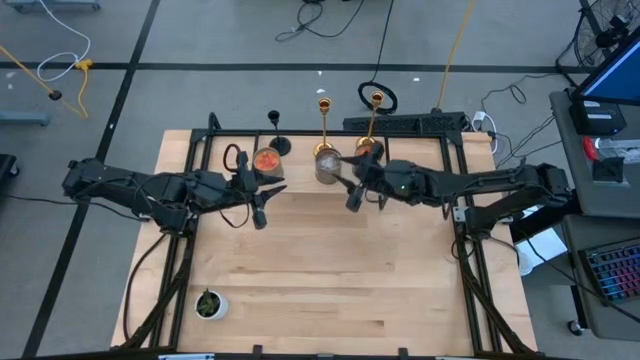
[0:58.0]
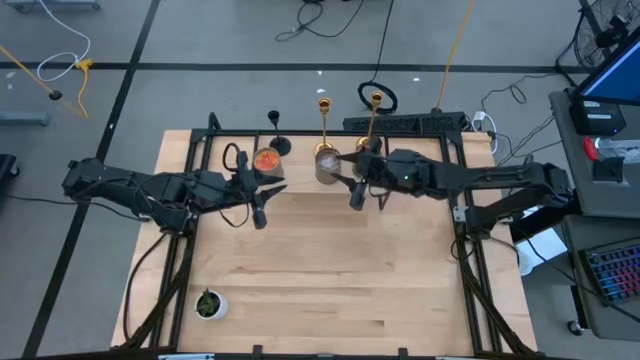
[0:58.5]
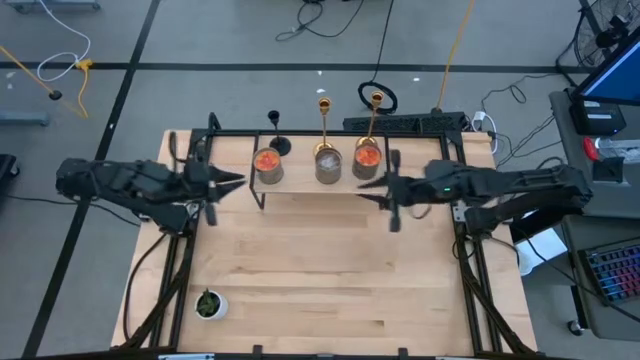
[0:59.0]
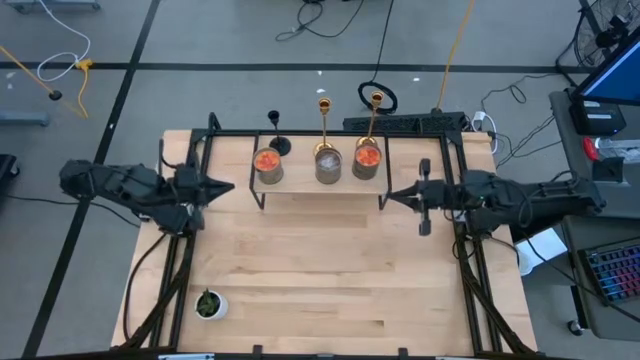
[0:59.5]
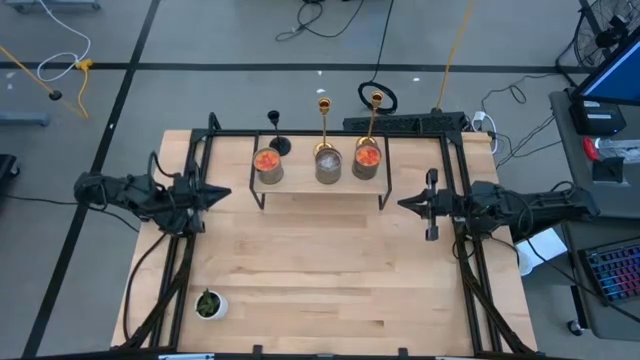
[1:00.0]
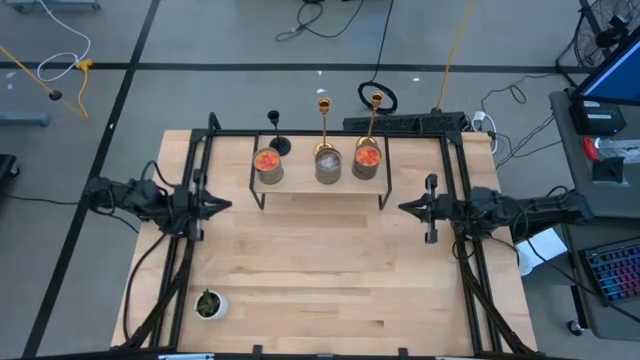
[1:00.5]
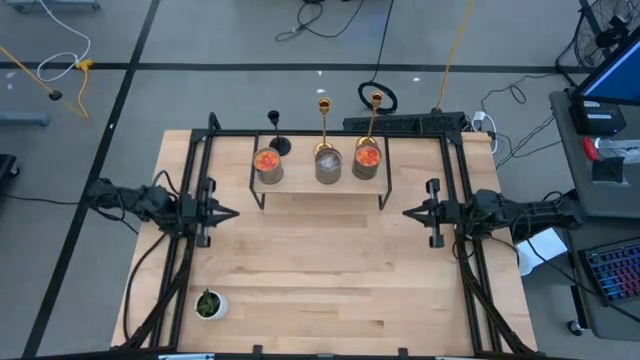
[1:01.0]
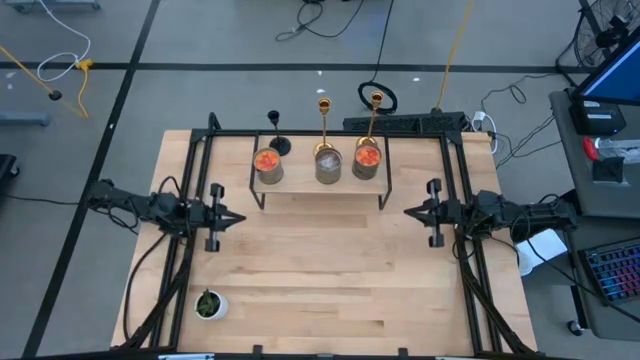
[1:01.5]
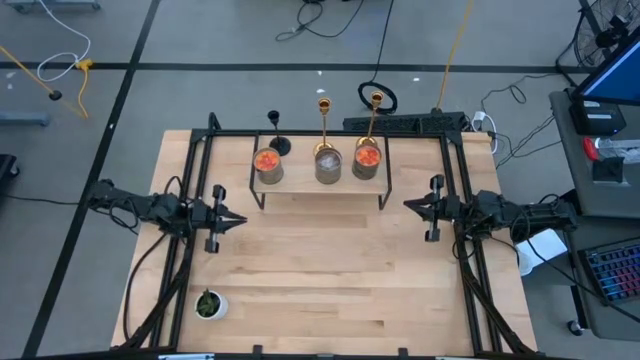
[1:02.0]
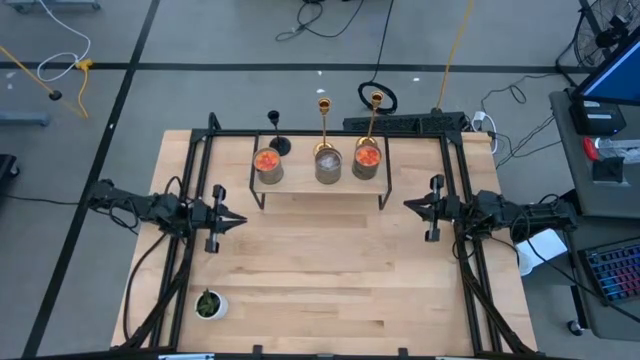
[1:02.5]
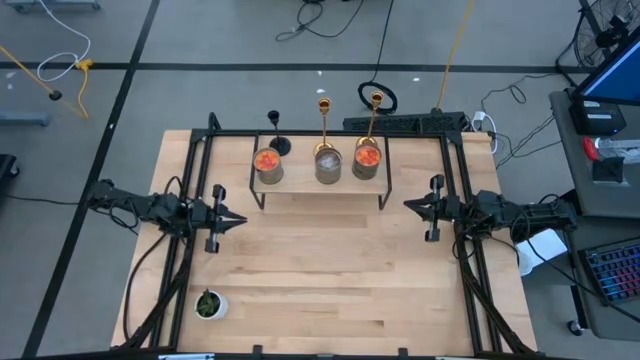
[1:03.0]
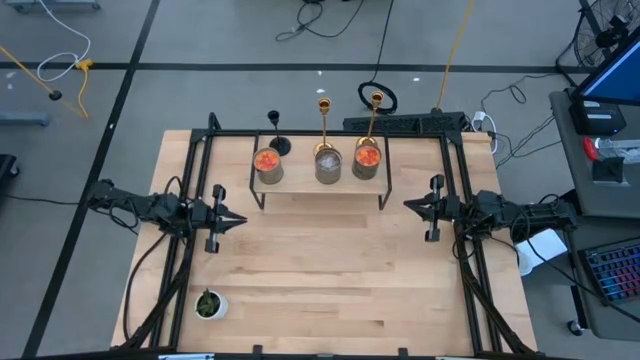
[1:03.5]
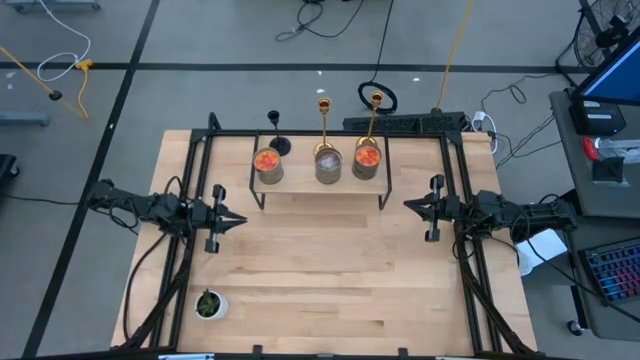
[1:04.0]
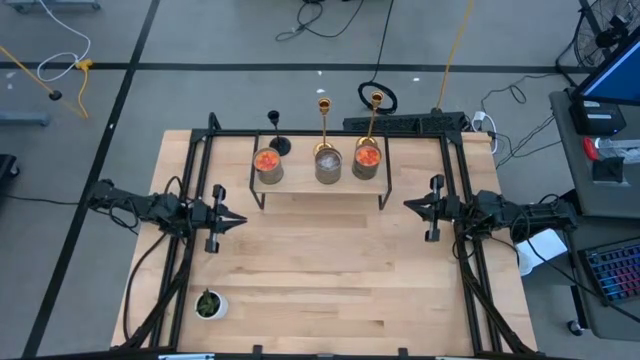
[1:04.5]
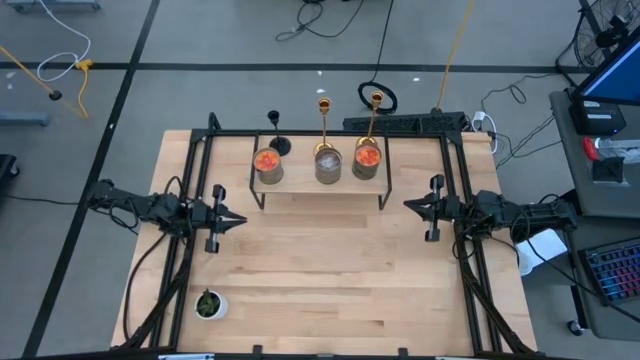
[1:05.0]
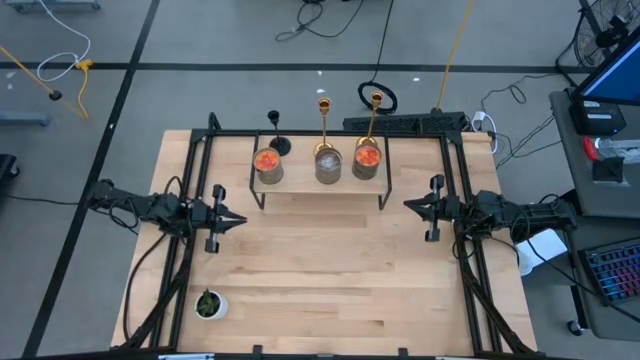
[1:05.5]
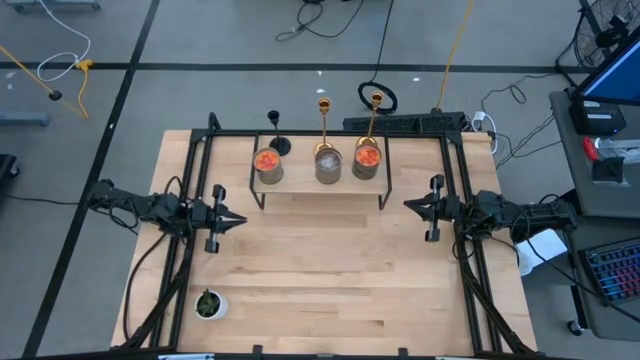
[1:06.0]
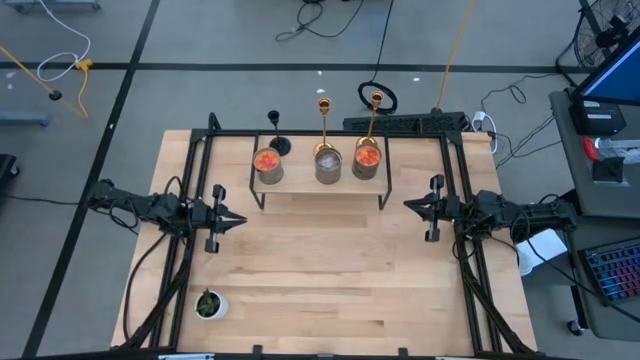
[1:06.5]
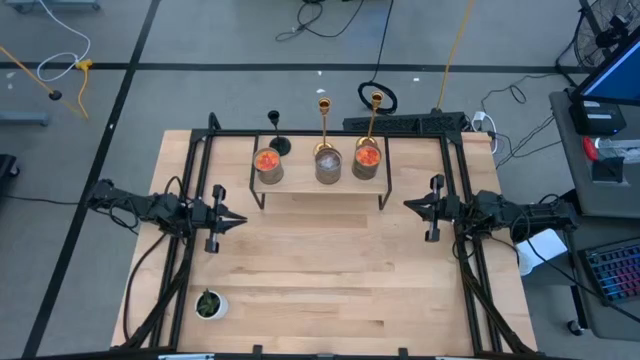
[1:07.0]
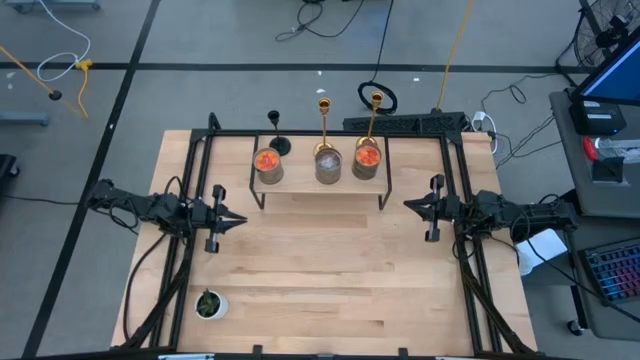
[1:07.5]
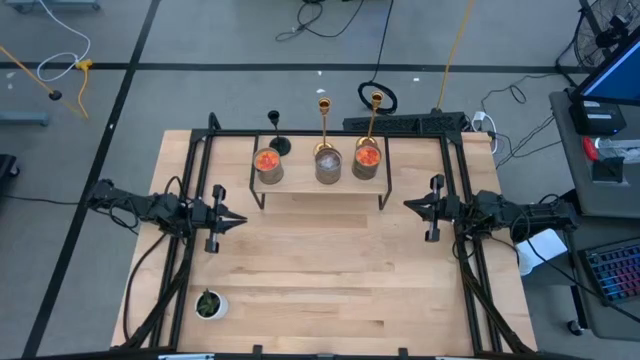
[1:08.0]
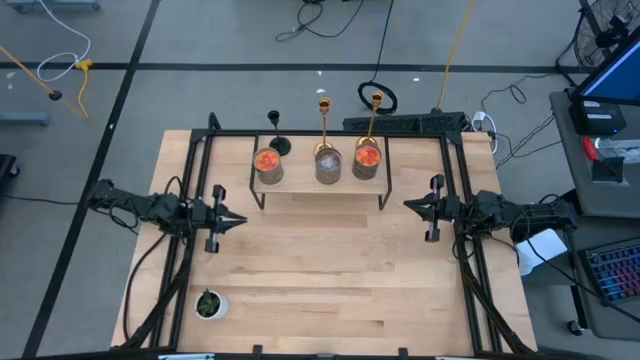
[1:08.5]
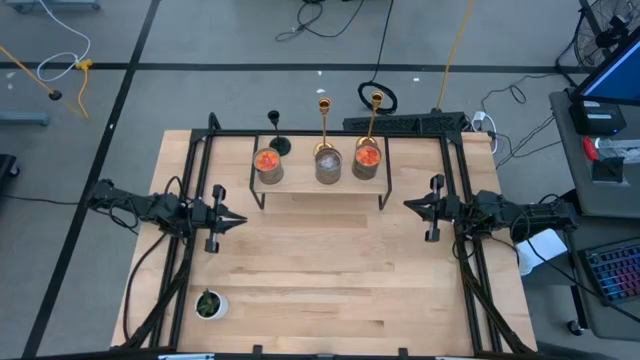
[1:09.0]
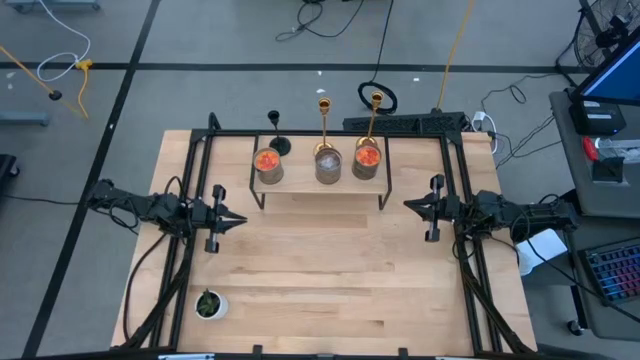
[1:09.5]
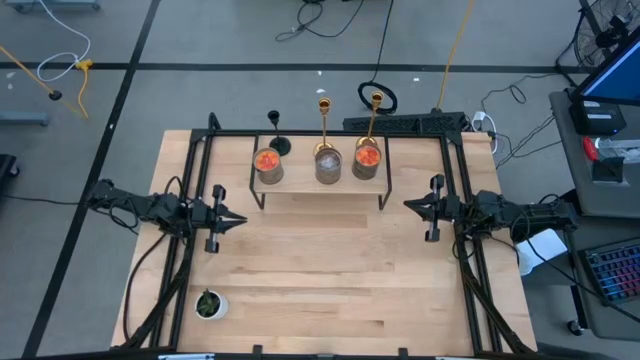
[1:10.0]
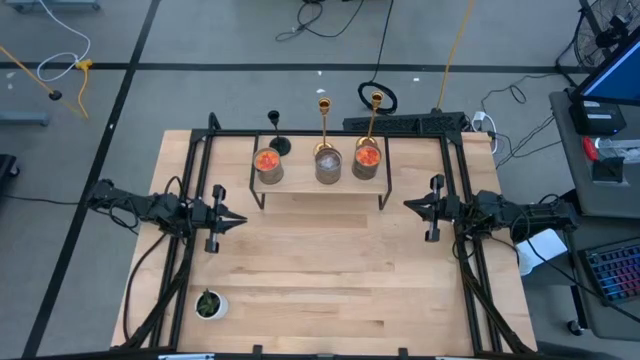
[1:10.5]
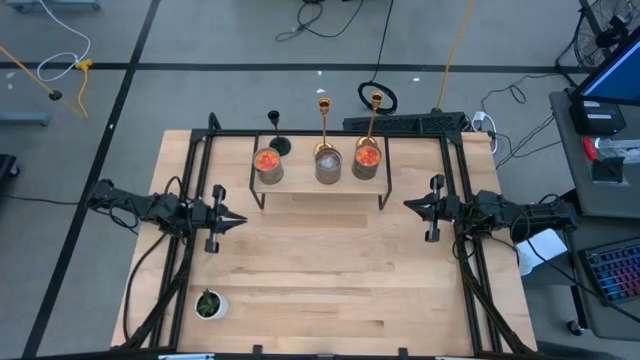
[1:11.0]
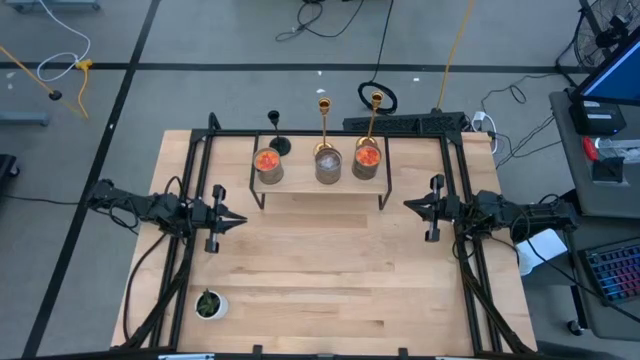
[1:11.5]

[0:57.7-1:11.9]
Task: Pick & Place candle stick holders
Return to Home Position

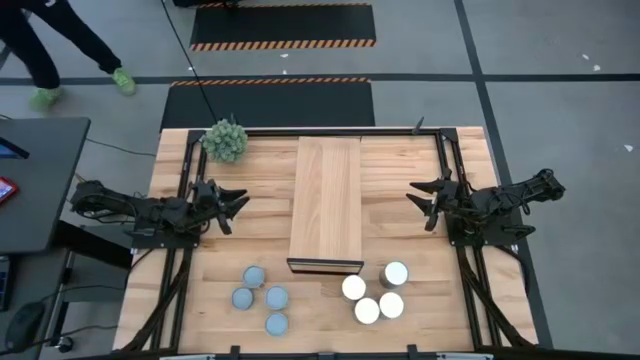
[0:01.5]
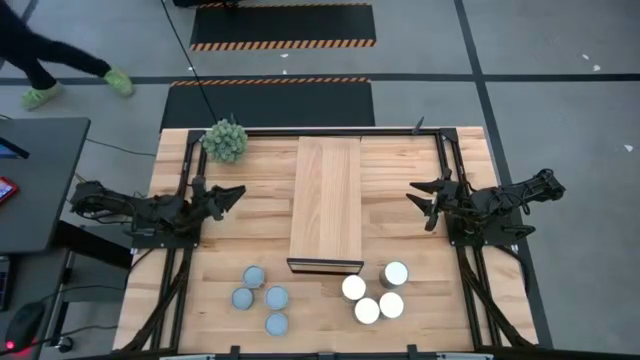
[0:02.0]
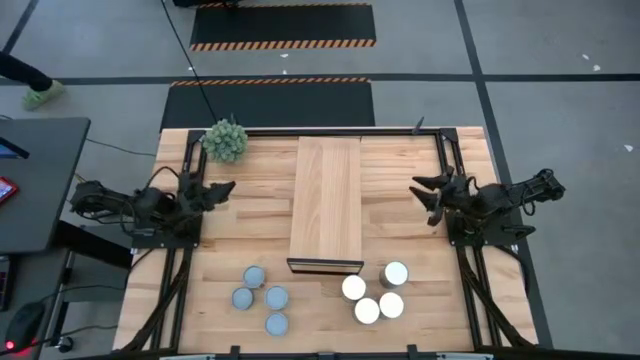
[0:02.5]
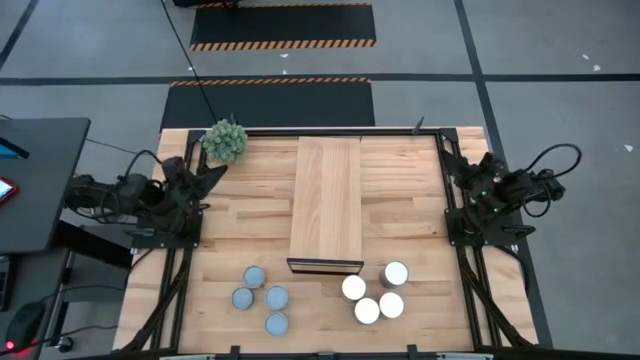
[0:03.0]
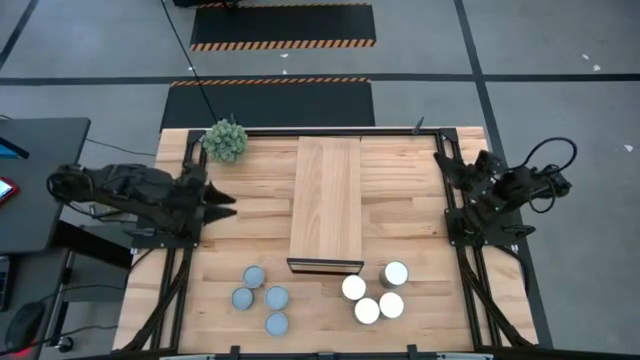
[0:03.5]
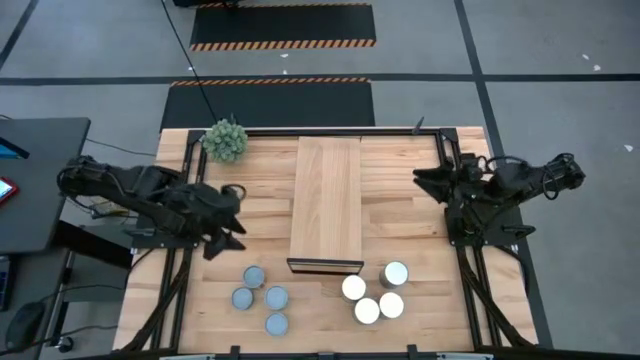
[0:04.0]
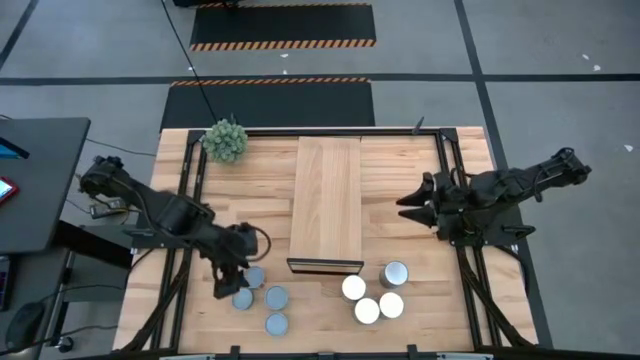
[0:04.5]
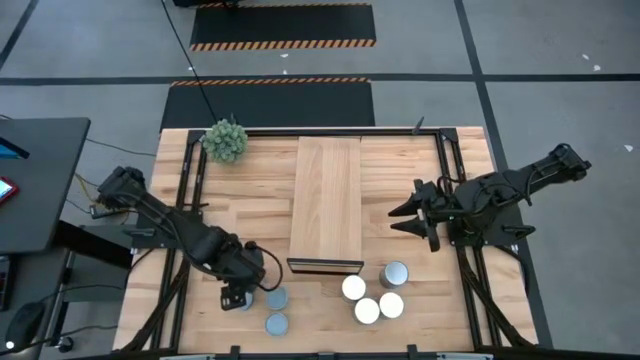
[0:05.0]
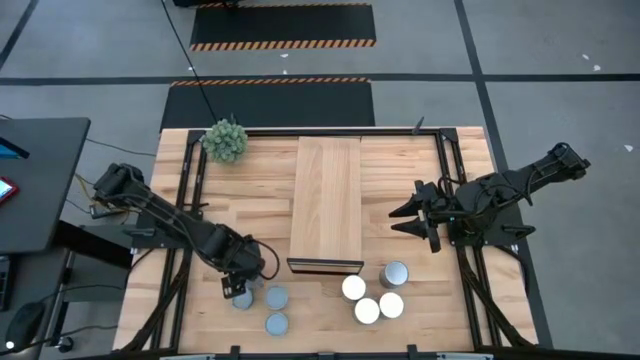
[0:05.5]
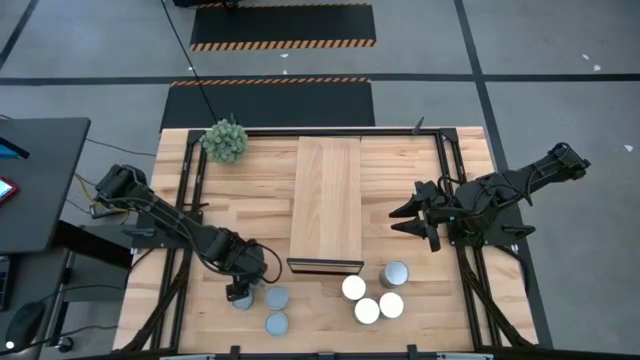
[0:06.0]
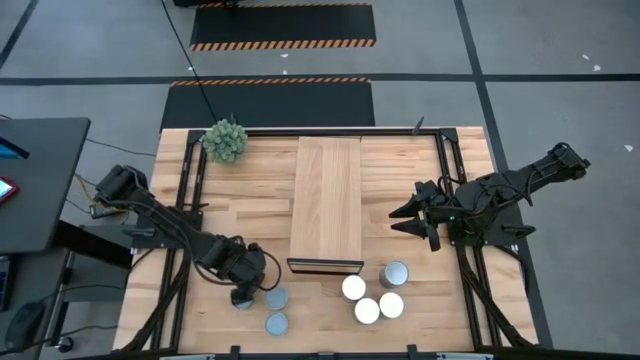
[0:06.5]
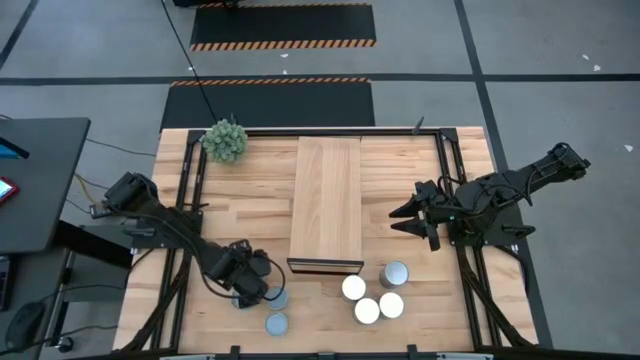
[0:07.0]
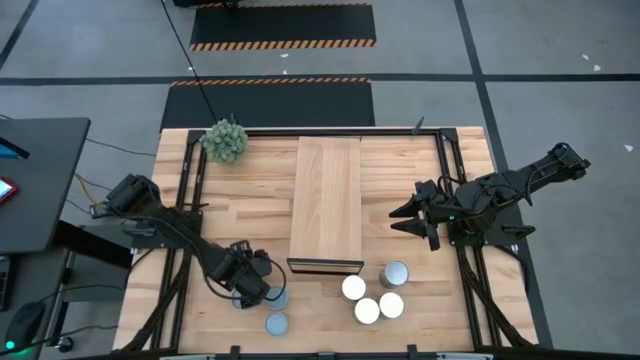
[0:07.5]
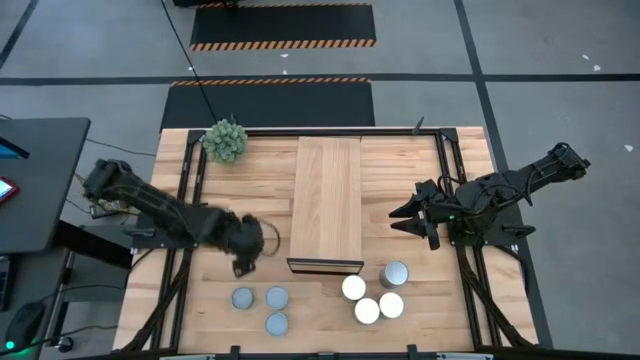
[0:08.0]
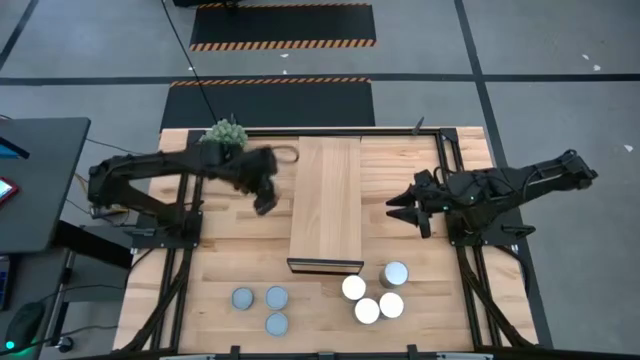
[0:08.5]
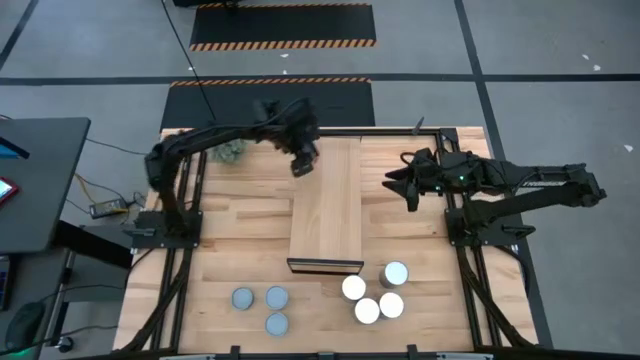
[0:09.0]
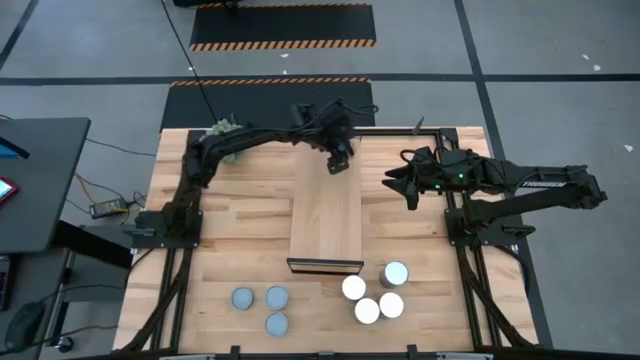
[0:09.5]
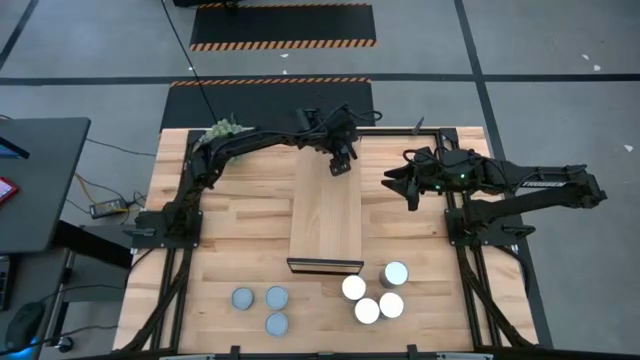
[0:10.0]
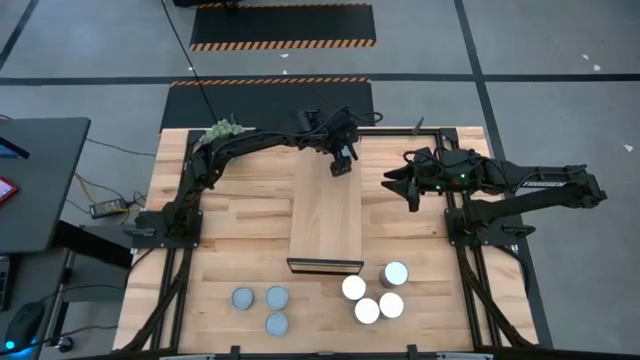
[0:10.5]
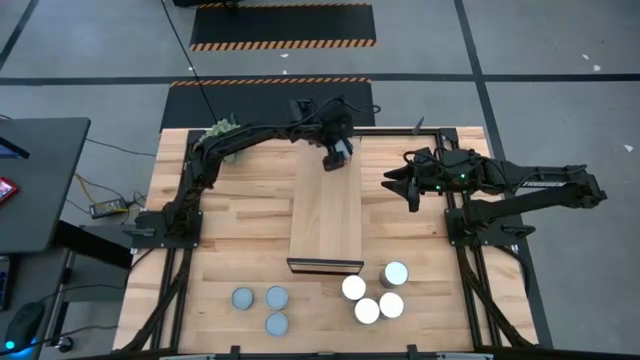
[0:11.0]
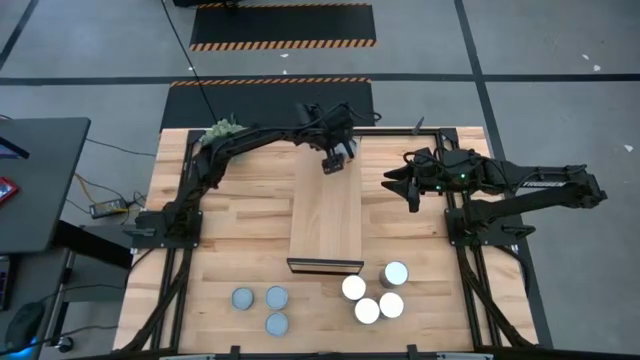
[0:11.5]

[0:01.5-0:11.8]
Task: Pick and place cans onto a shelf
Put the small canned diced tomatoes on the shelf
